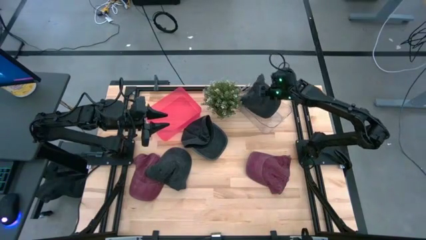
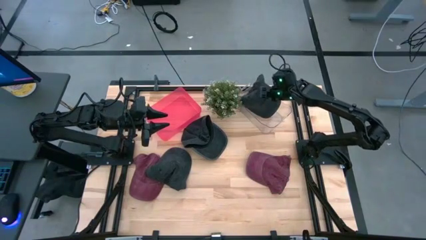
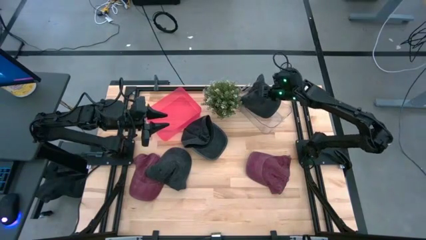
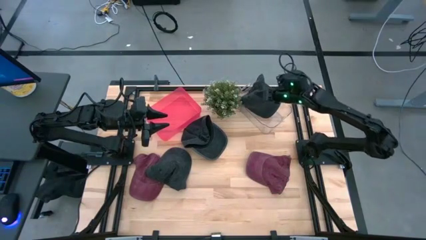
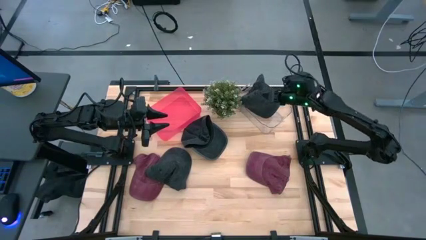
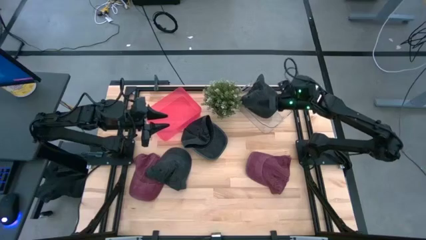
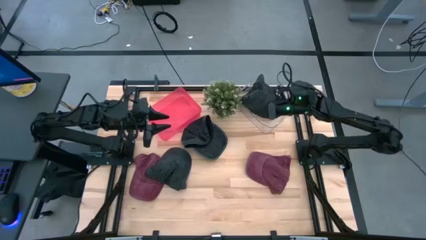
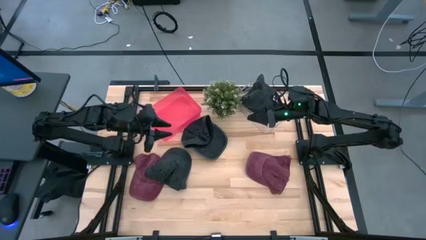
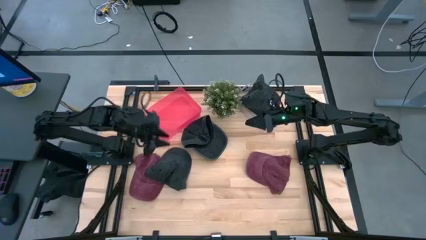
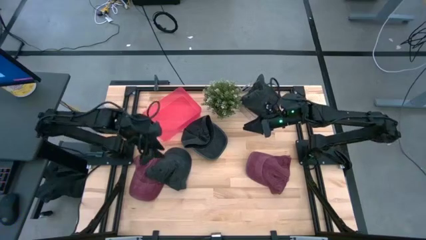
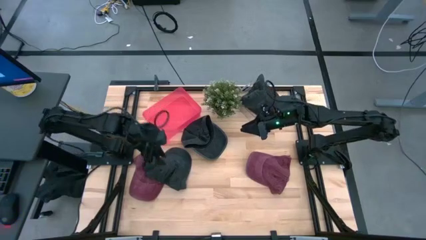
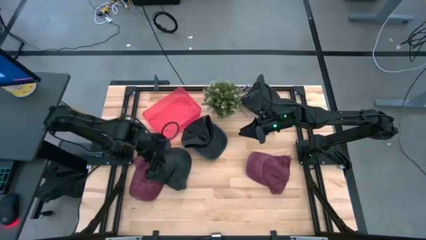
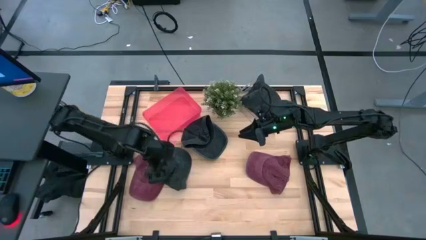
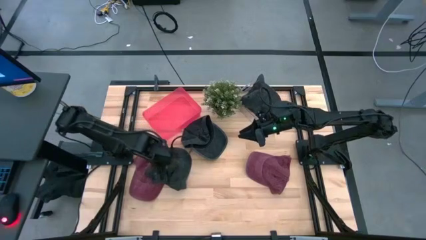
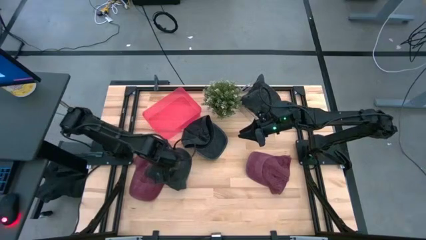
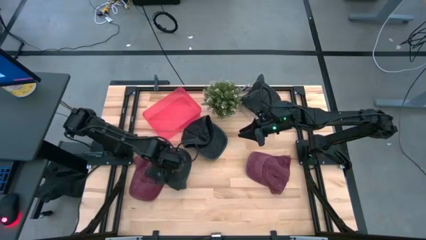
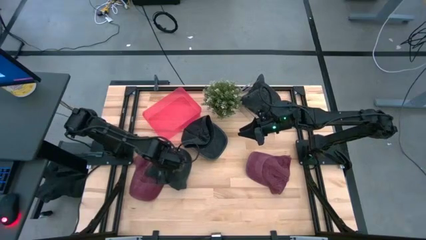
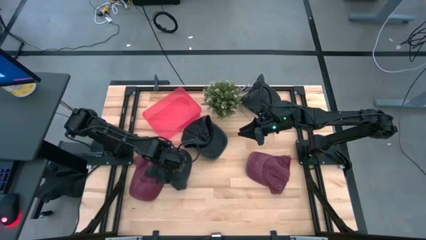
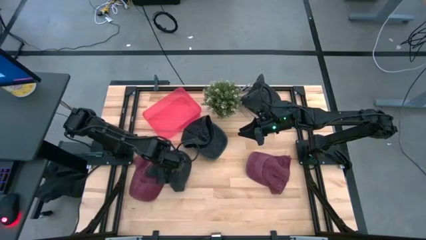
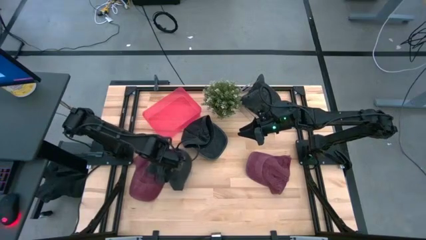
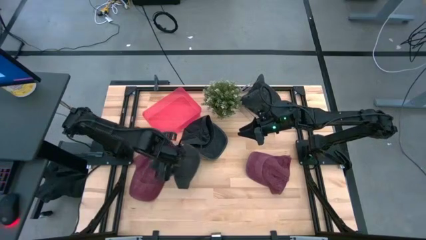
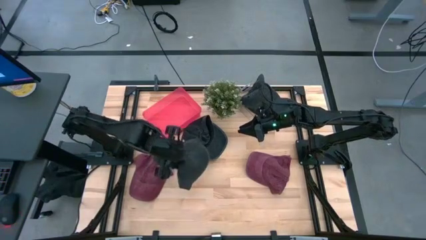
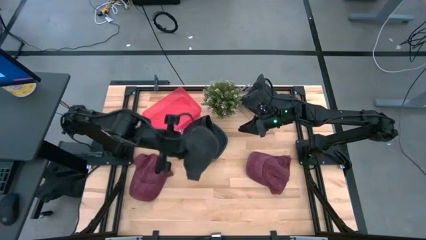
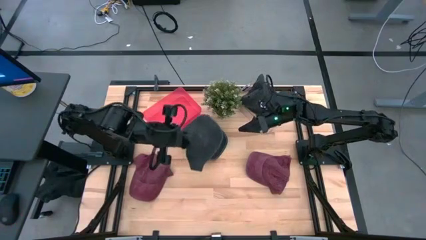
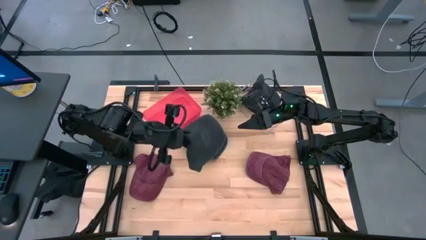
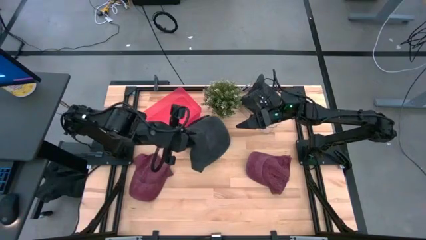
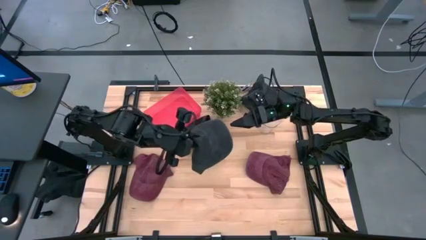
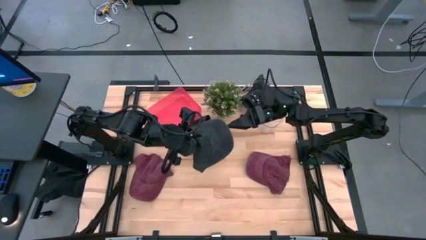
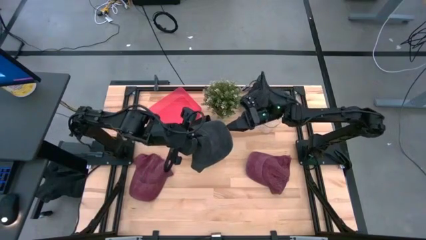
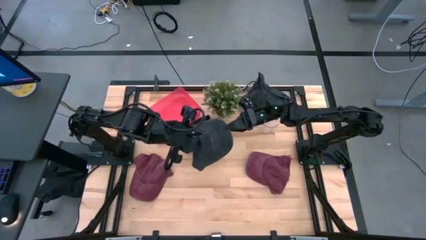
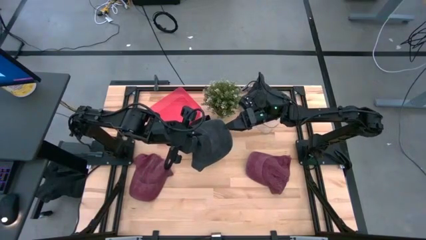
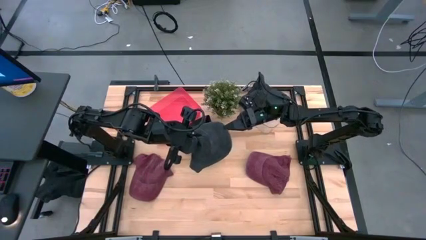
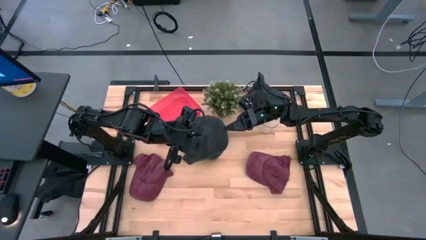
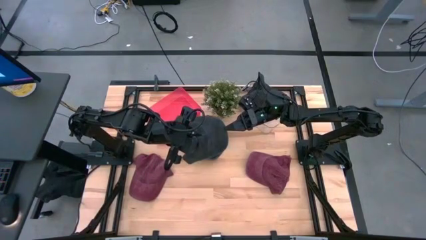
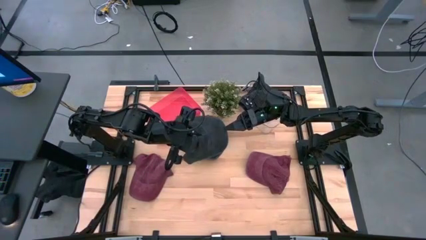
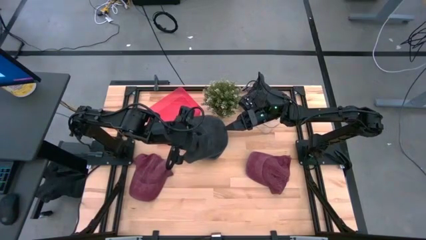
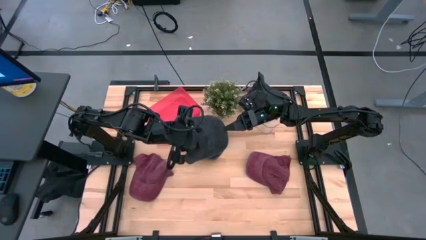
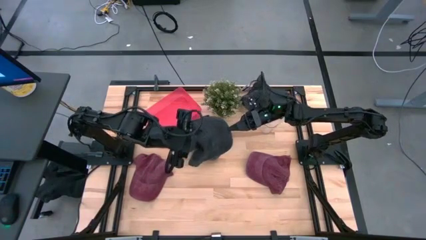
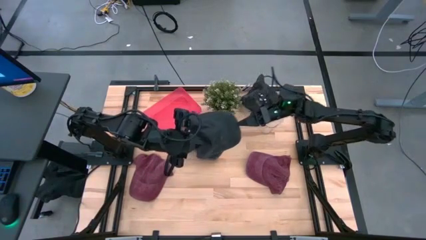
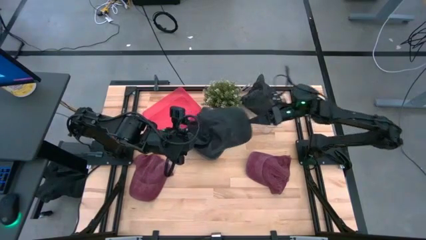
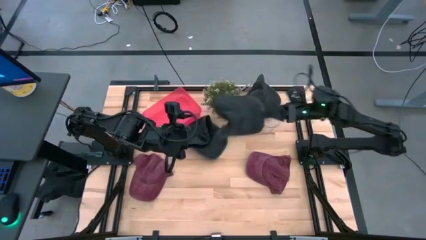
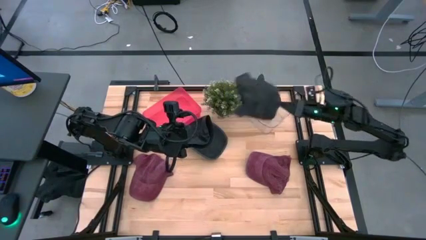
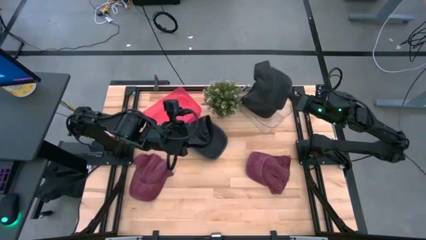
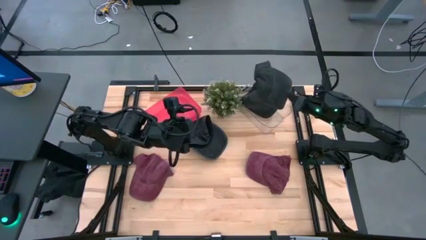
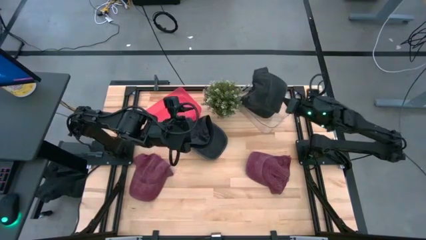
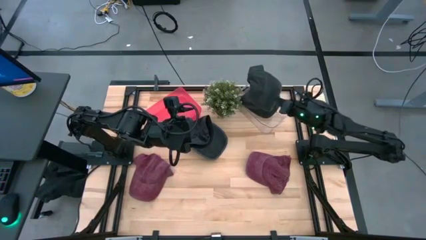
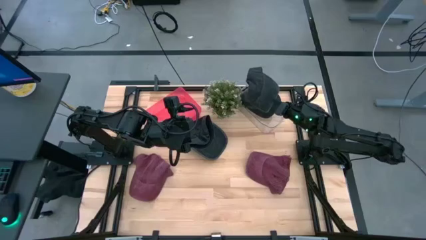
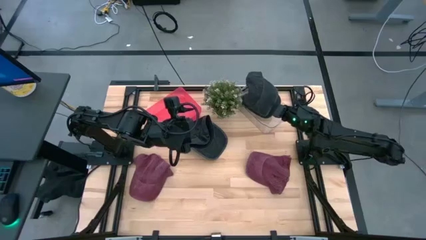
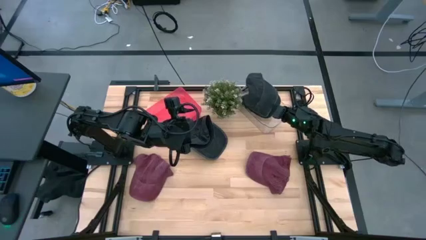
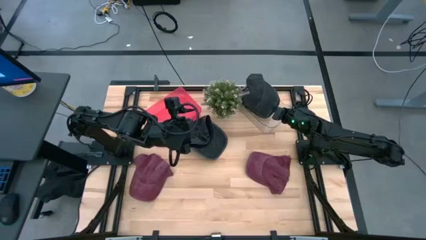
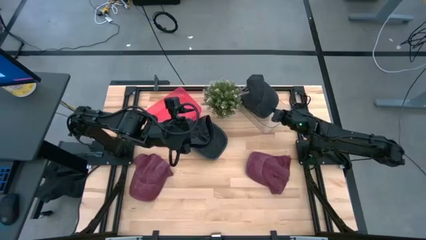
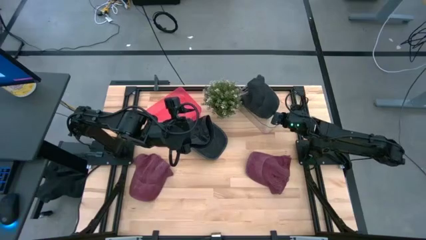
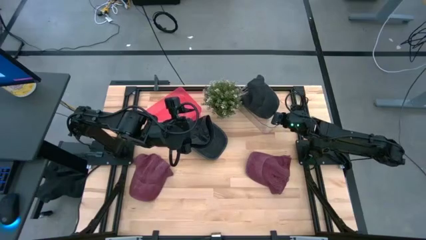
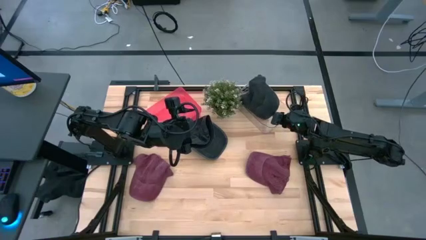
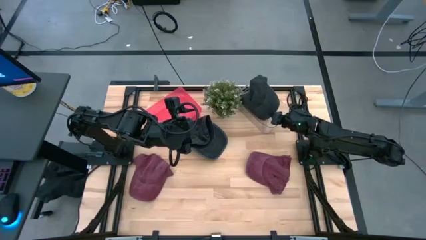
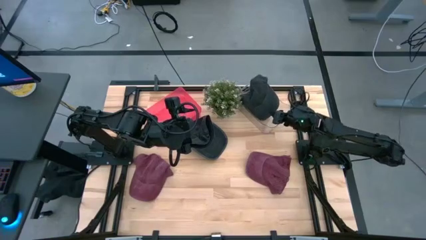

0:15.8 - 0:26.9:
Task: Pick & Place hat
Put the bottom black cap into the transparent bin
